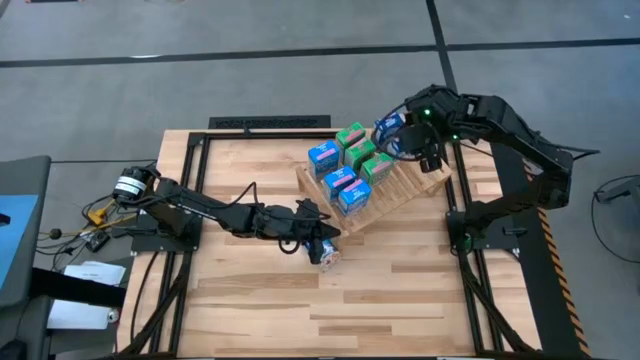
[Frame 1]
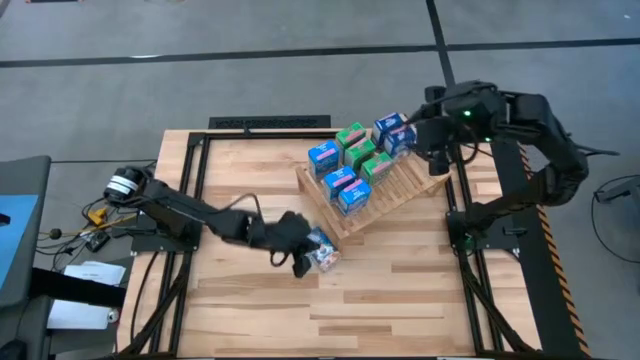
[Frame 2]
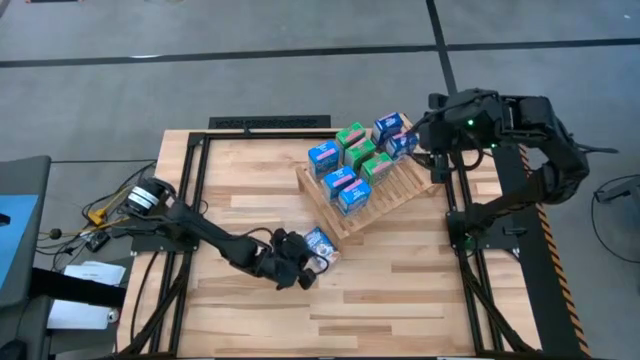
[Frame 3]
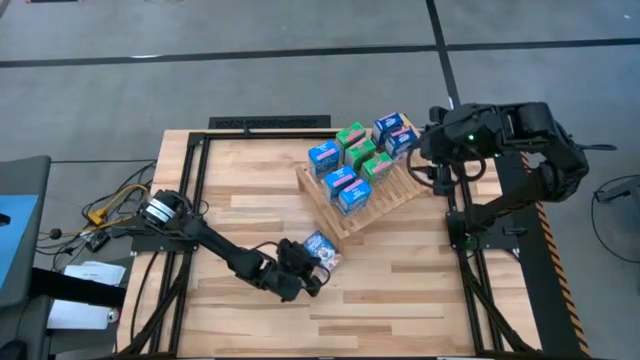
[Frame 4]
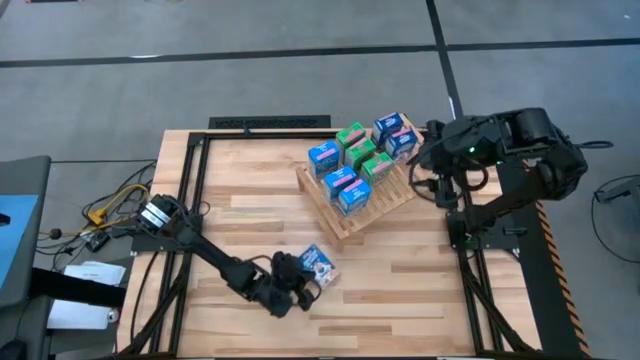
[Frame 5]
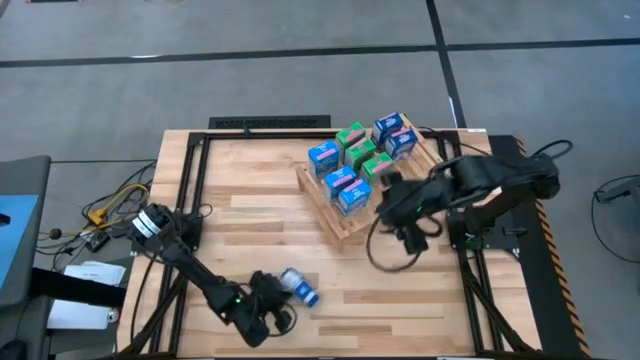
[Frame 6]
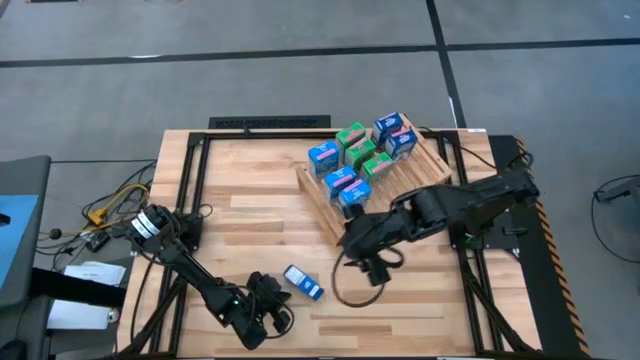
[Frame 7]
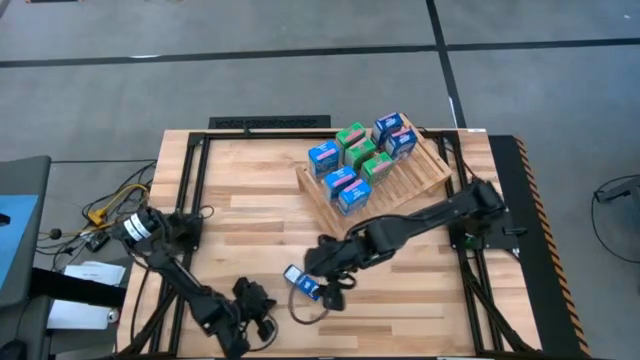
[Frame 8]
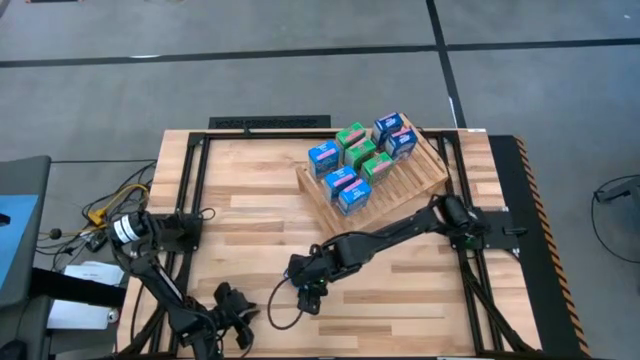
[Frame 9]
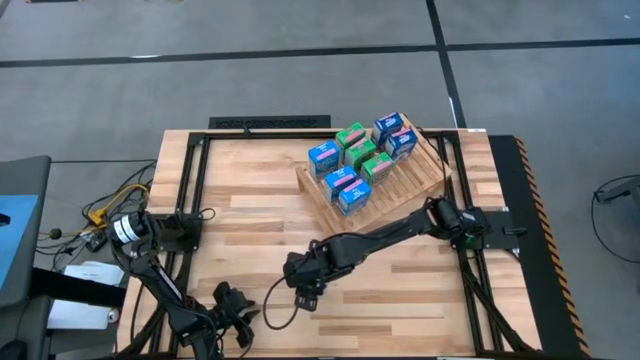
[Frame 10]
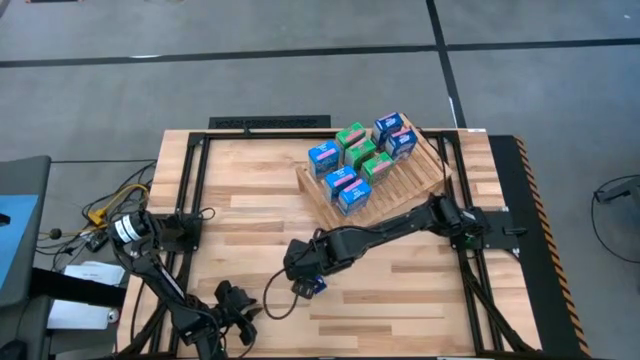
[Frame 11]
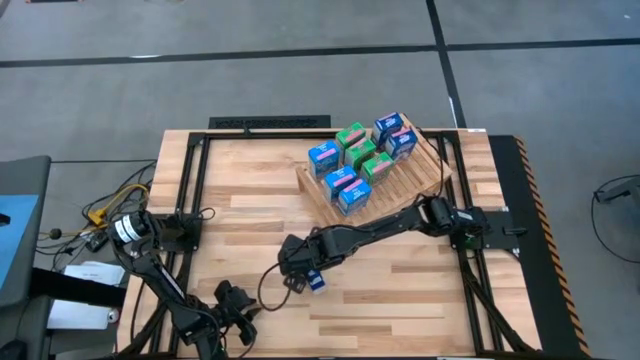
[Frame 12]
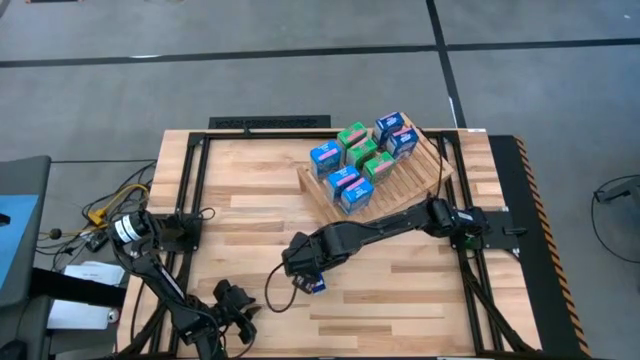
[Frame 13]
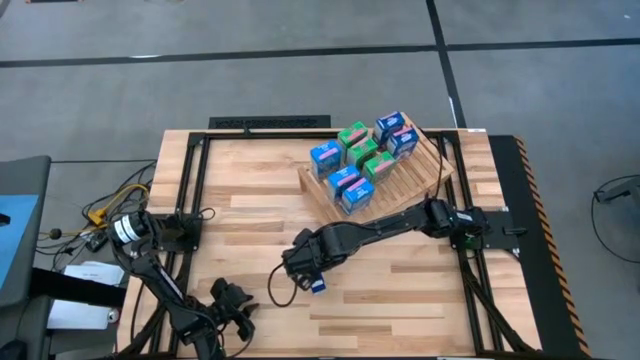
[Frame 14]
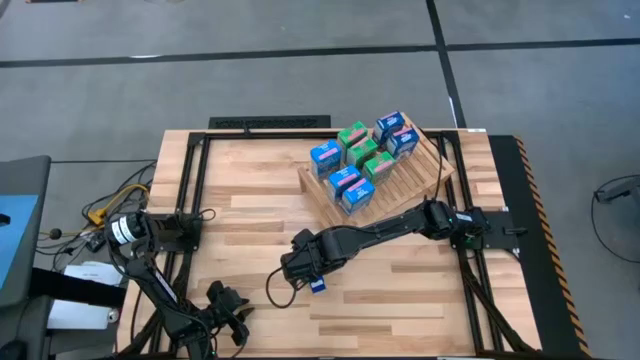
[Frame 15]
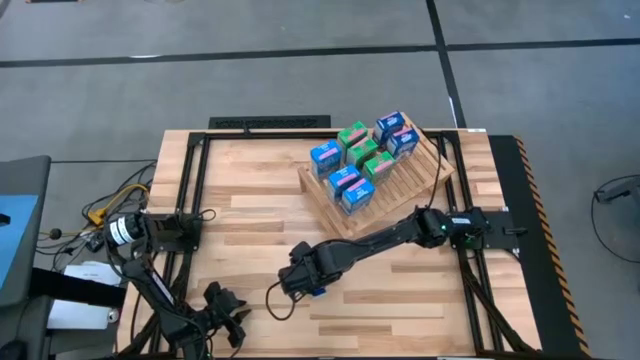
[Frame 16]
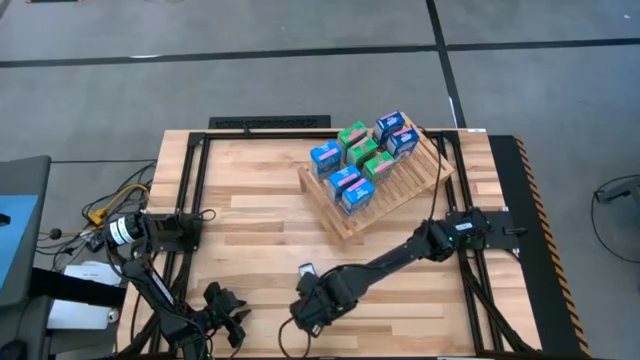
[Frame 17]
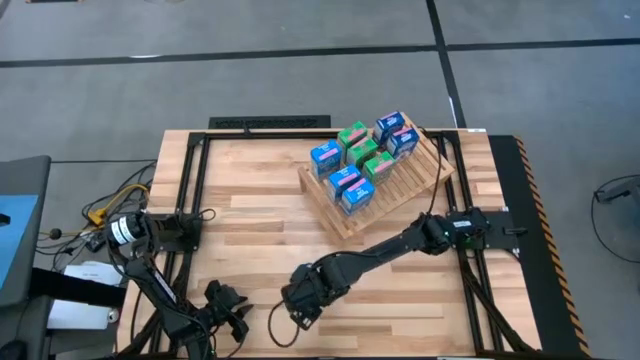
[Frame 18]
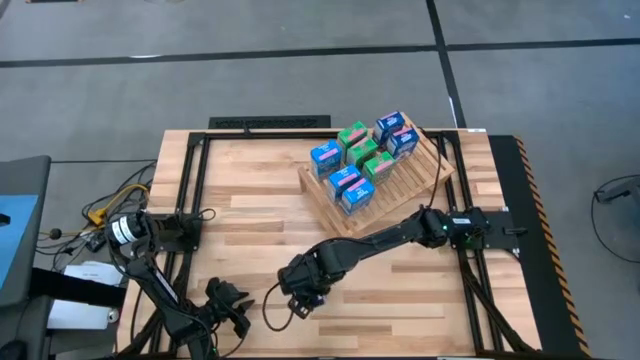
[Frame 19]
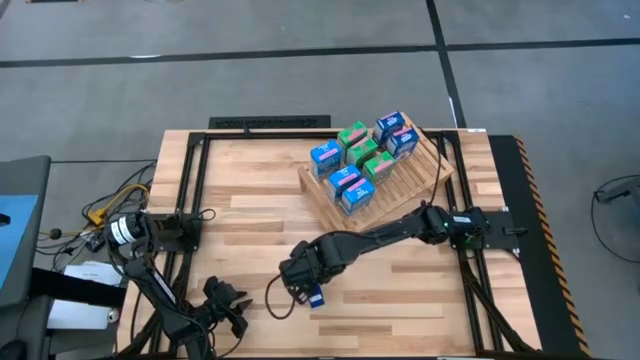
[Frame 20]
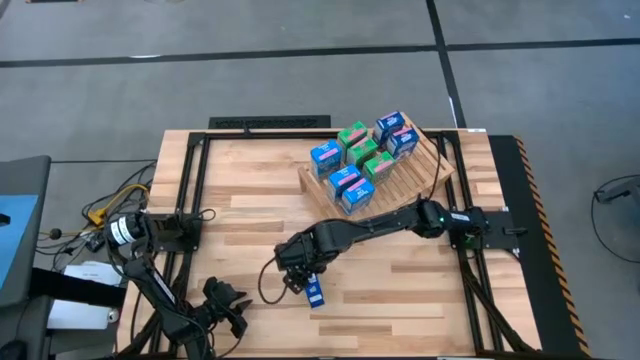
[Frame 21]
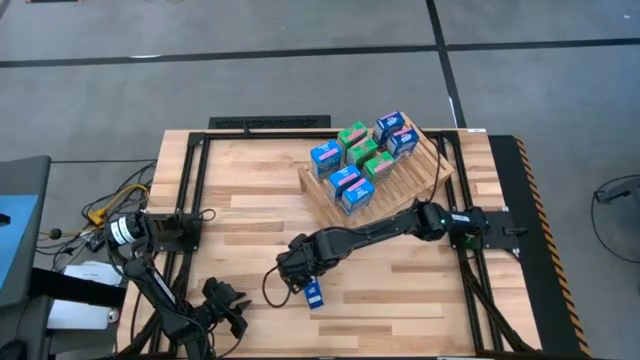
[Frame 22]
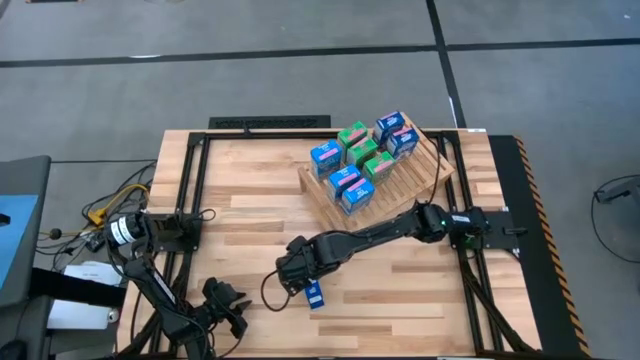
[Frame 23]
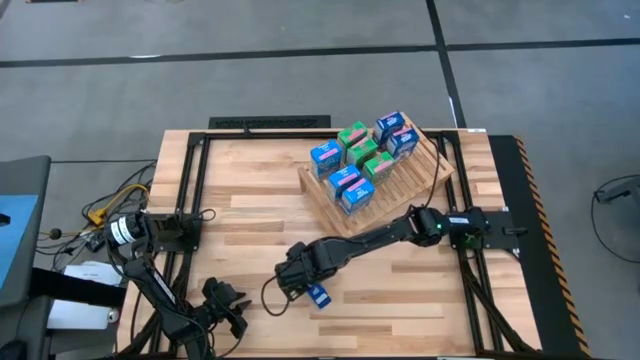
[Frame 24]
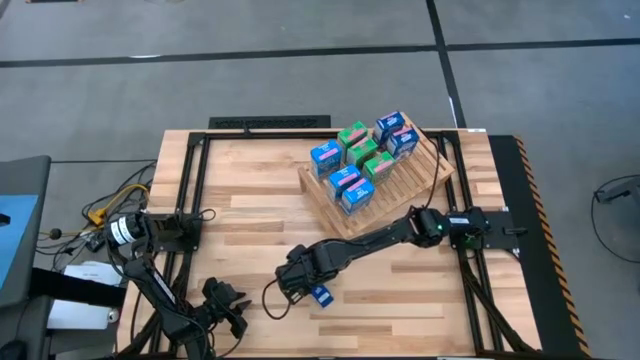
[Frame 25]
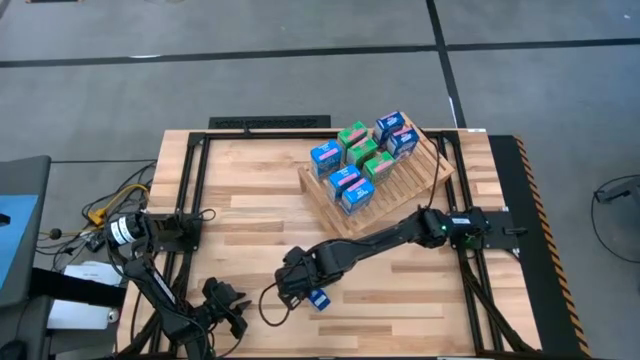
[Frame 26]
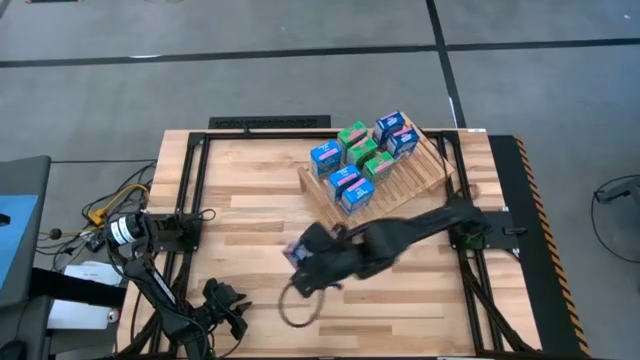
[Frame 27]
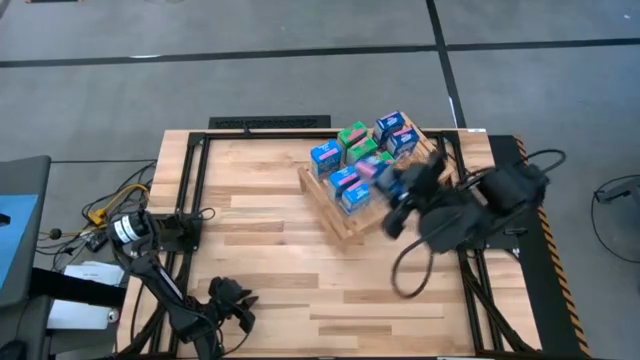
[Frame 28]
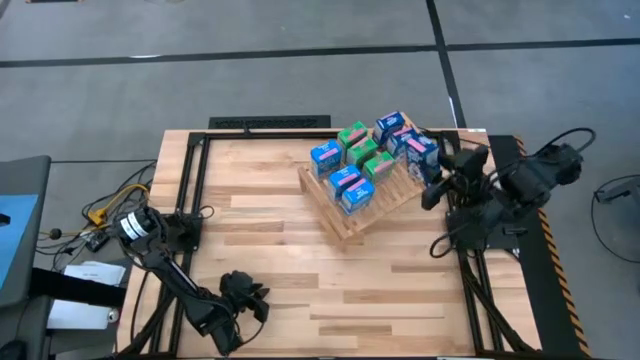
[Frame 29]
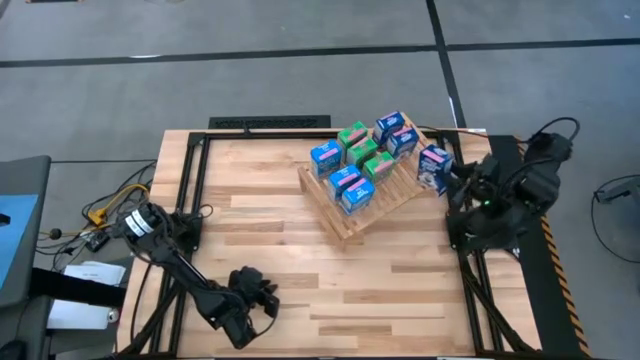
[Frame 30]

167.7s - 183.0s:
Task: Stack cereal on shelf
Put the blue cereal aligned with the other blue cereal boxes on the shelf

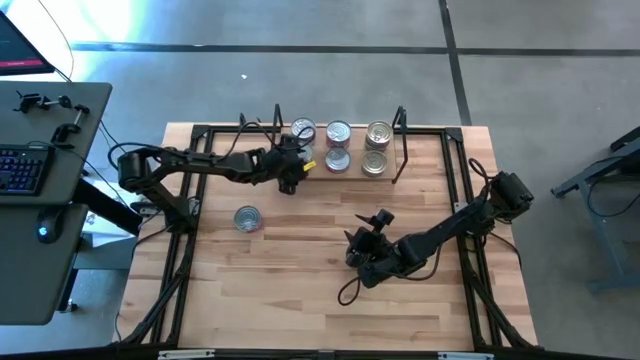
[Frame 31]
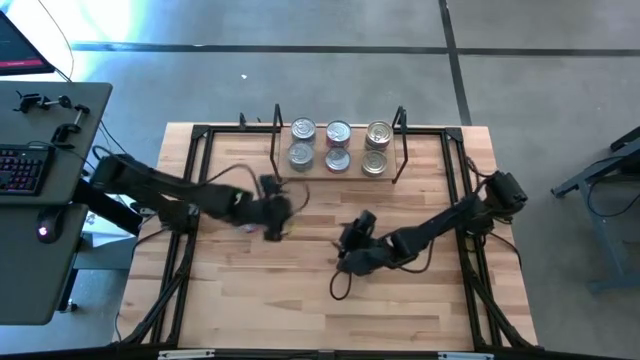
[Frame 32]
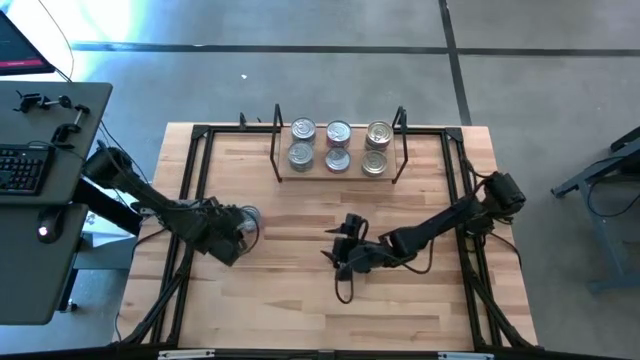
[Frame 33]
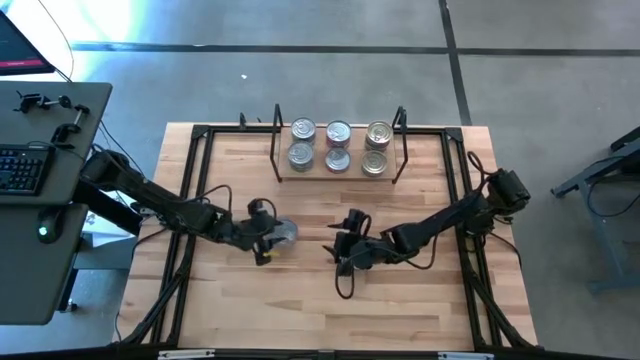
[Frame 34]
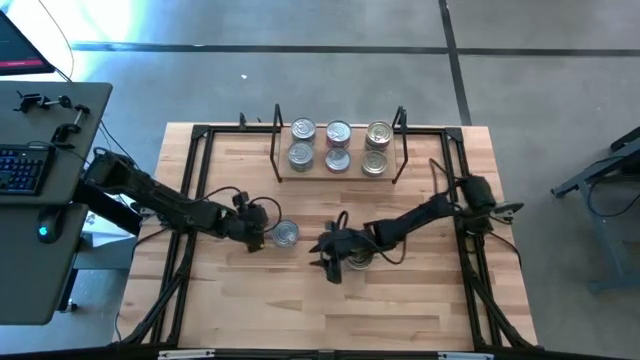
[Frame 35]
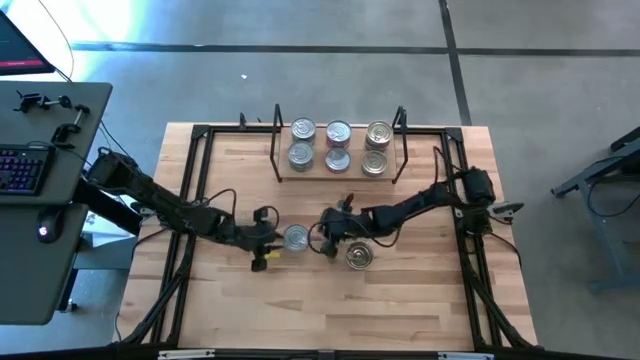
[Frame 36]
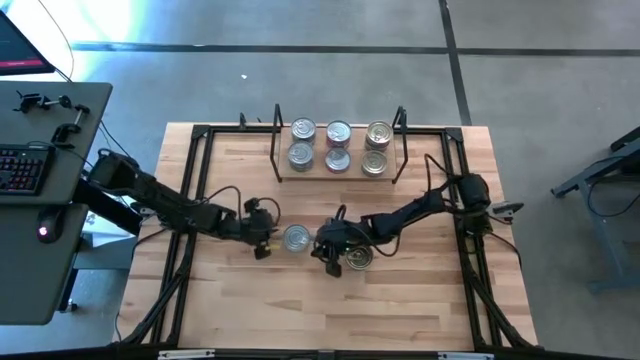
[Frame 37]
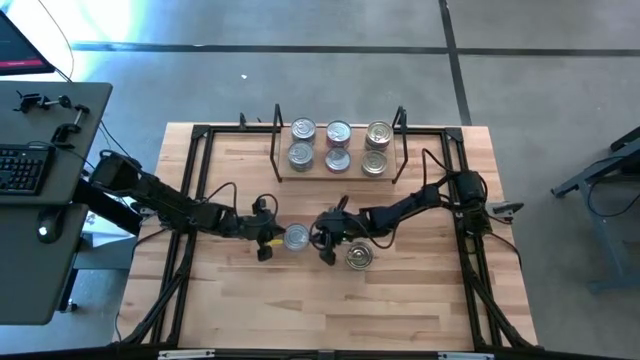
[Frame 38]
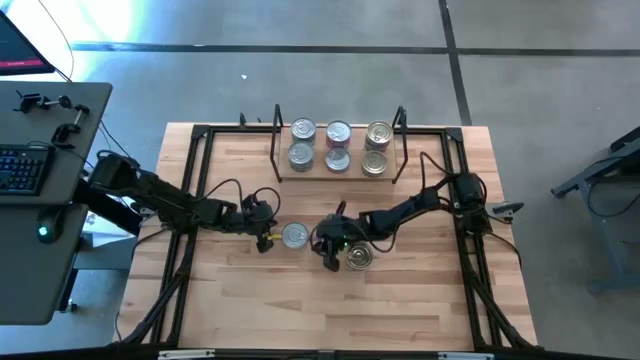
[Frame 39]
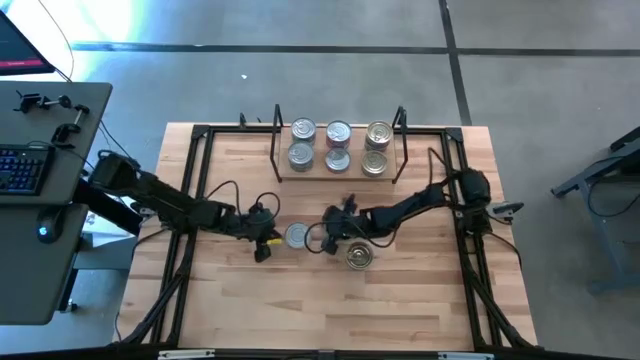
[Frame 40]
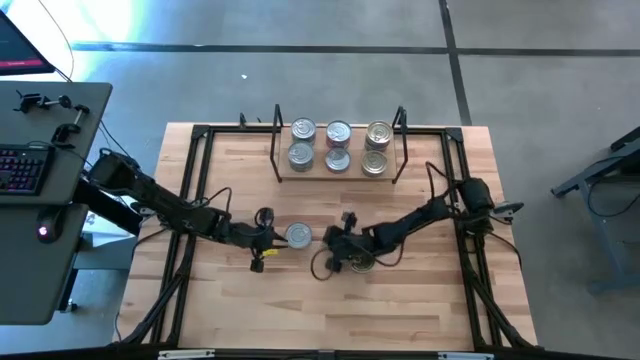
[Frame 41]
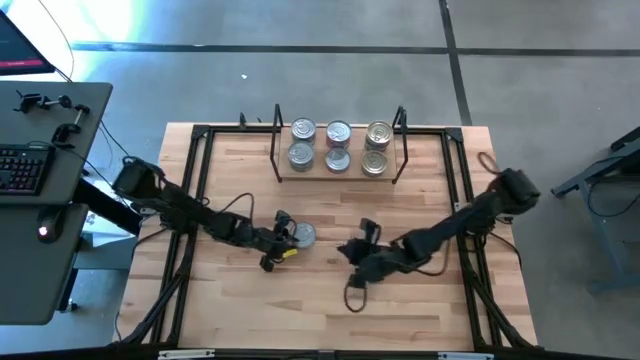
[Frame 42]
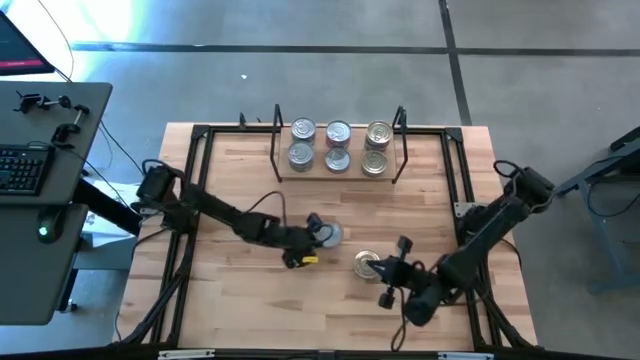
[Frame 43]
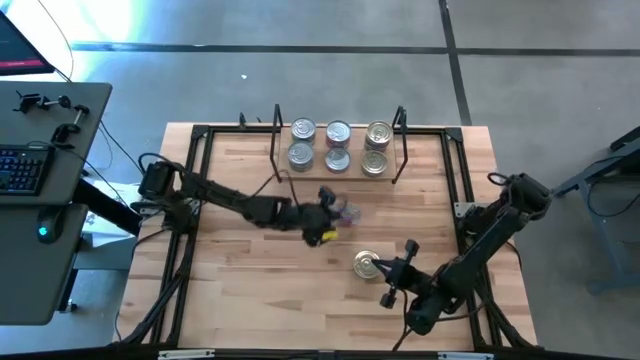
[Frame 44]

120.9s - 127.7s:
Task: Stack canned seafood by type on shelf
Stack the red tuna can on top of the other red tuna can on the shelf
